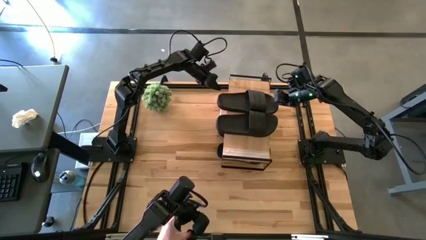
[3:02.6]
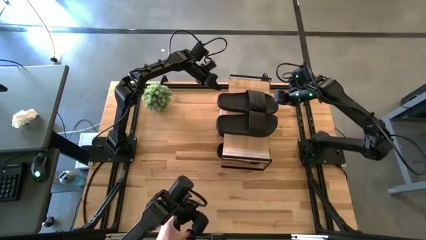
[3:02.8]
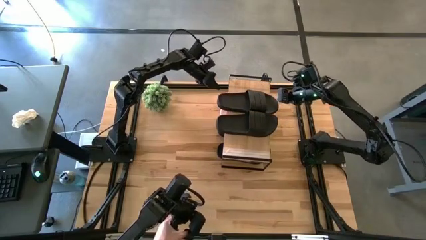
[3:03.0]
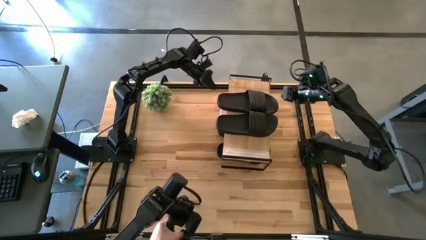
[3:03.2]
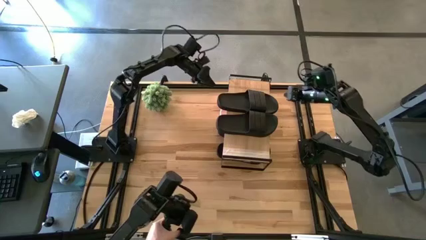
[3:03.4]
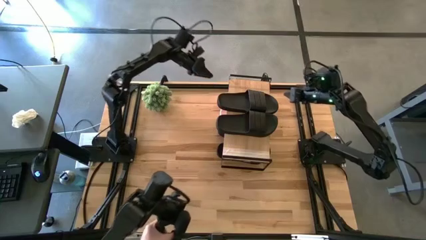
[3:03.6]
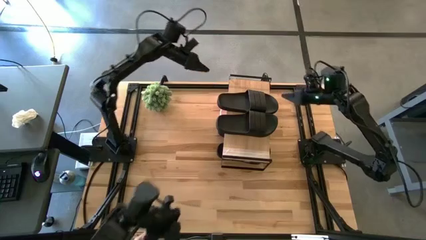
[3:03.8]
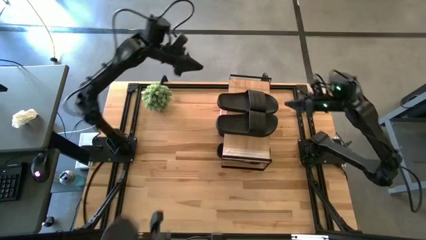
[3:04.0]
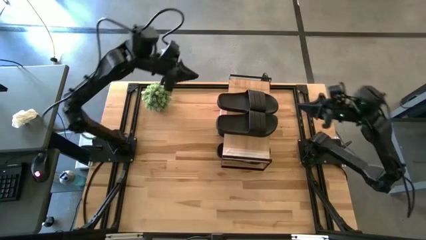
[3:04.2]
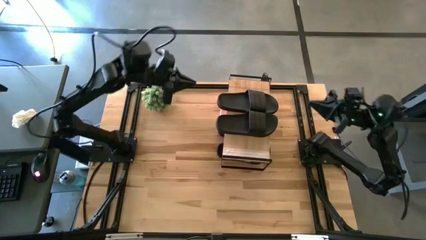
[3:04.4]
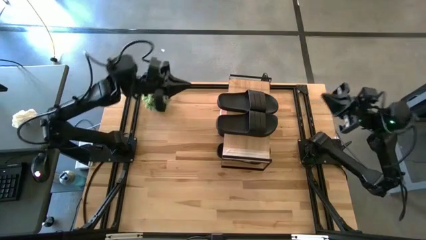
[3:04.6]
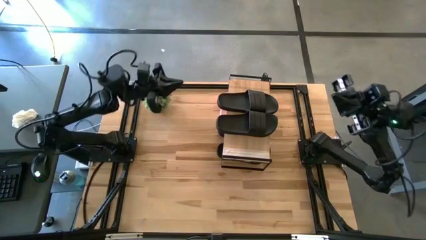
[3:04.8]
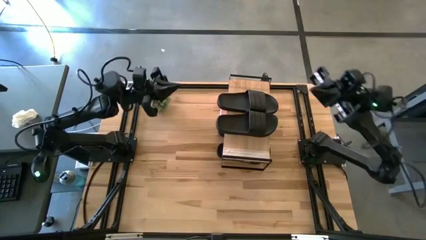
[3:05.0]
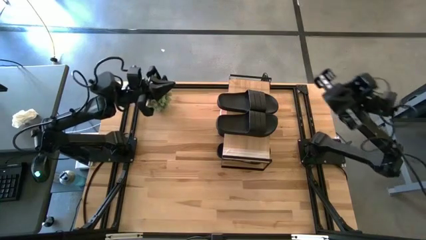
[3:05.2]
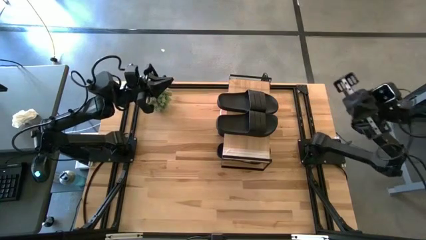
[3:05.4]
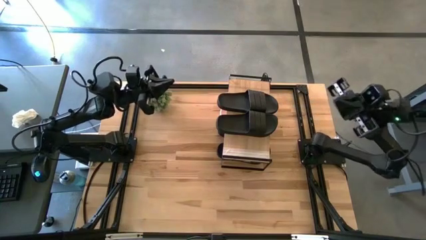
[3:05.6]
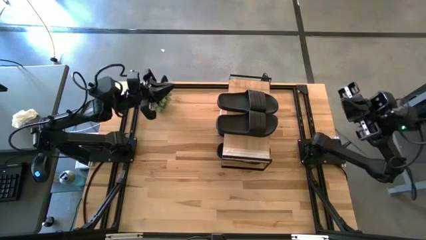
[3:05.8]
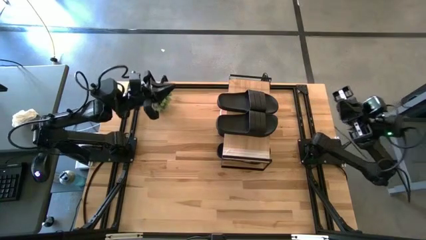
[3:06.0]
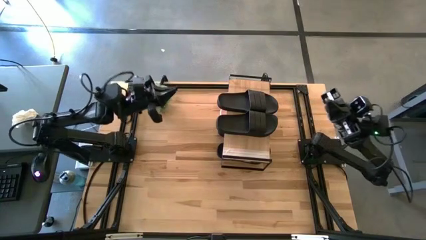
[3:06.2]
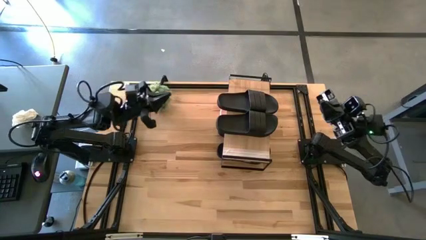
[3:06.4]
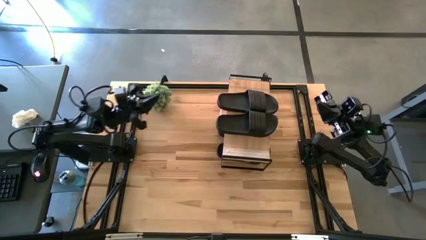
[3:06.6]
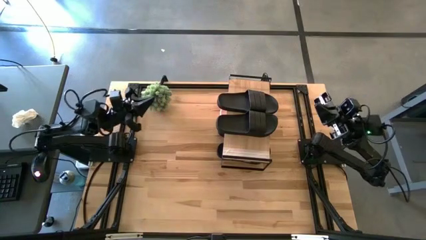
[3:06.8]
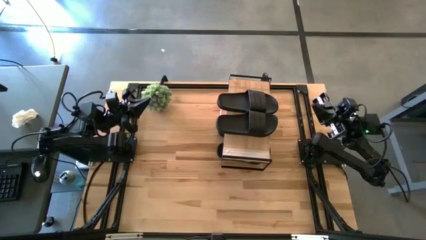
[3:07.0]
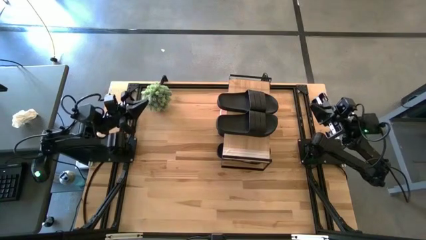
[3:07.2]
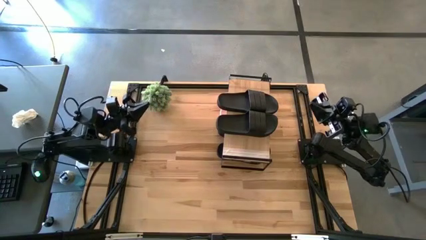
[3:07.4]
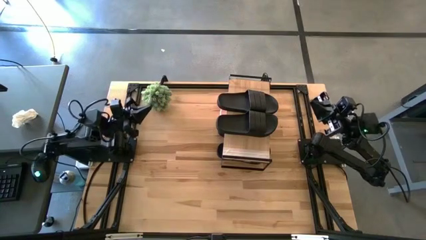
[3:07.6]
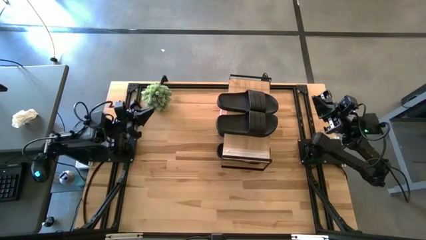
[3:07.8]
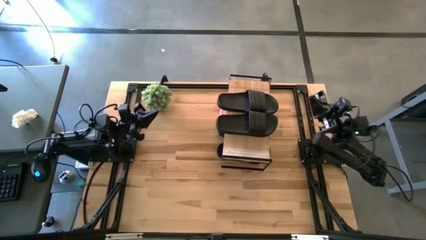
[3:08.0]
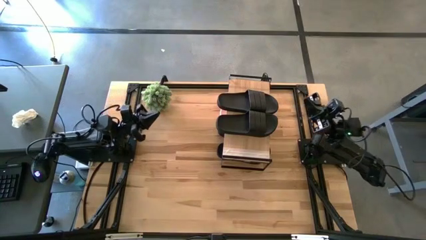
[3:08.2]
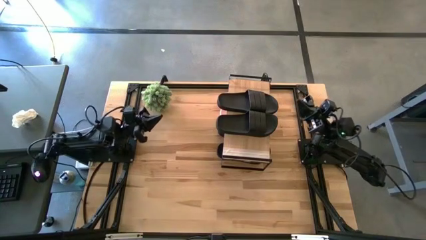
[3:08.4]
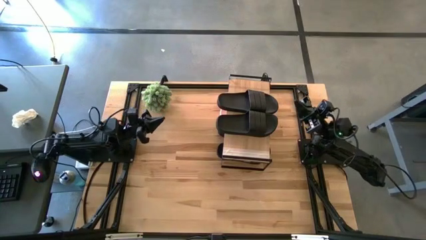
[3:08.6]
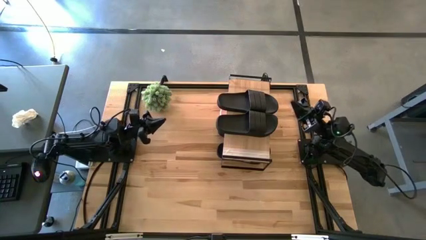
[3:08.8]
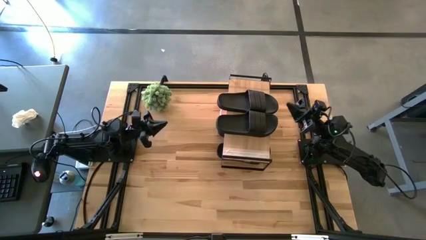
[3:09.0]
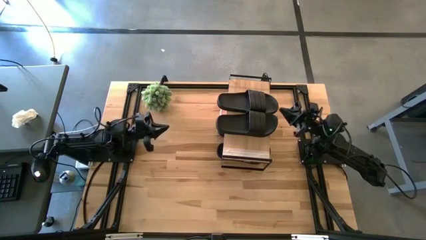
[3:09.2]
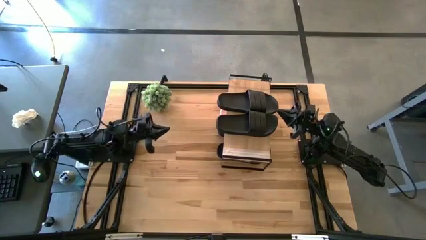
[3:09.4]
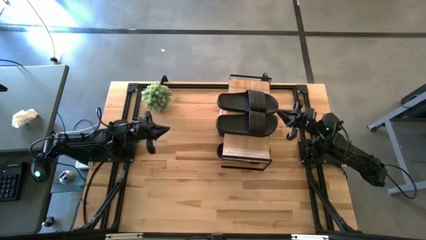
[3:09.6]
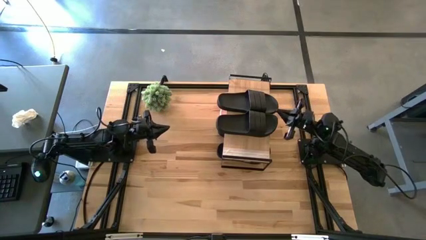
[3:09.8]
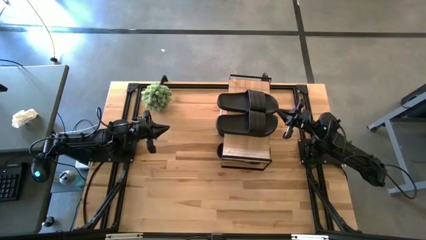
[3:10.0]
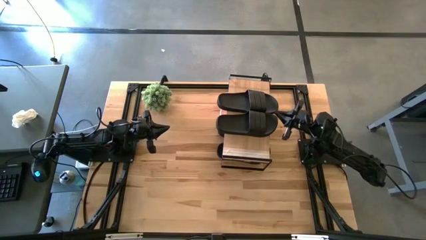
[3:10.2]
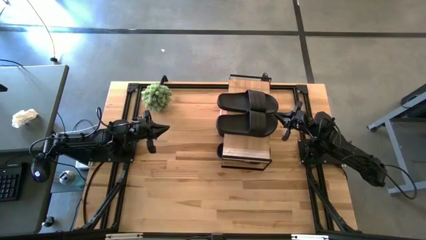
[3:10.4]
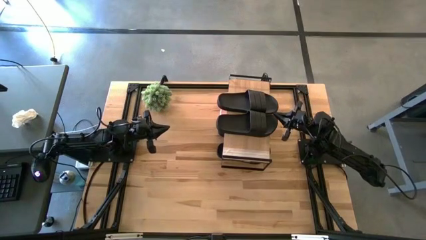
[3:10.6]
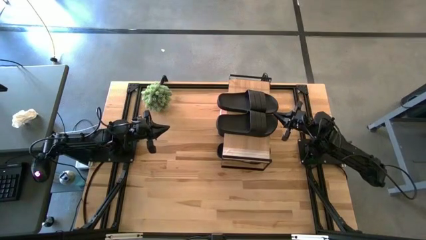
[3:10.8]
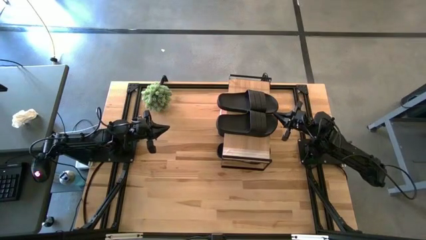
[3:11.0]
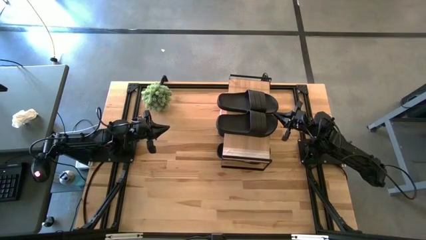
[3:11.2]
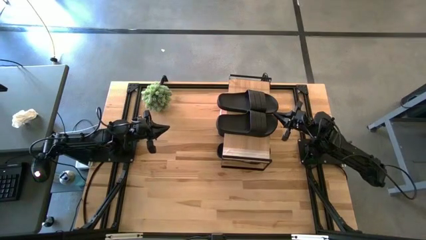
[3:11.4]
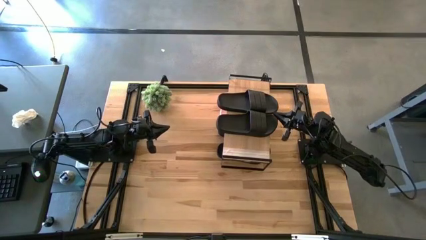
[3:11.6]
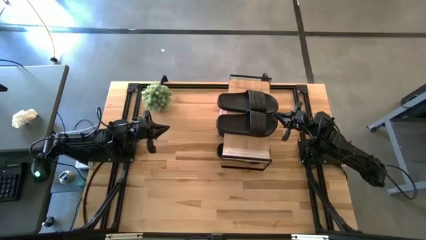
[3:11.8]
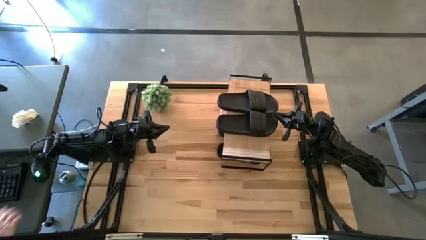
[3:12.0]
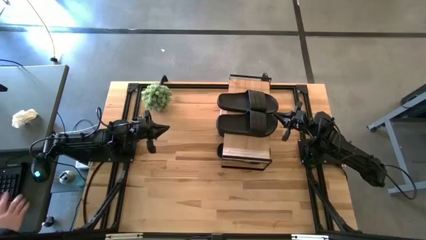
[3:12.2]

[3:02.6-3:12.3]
Task: Pick and place slides into the shelf
Return to Home Position

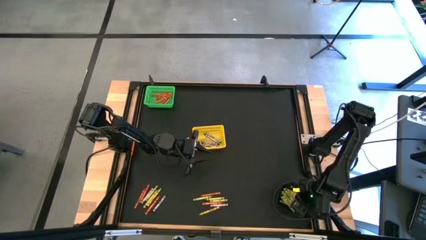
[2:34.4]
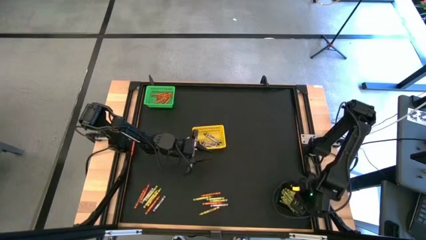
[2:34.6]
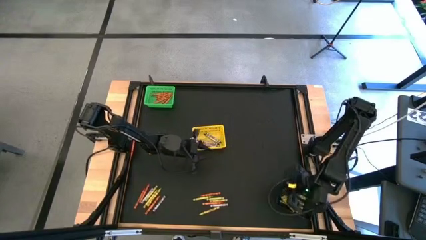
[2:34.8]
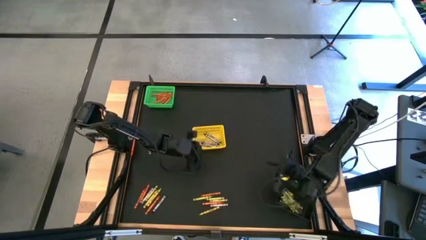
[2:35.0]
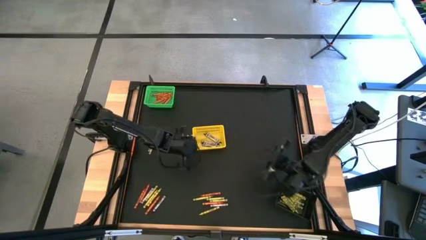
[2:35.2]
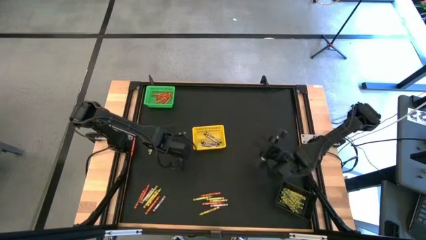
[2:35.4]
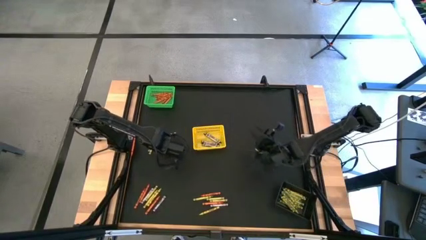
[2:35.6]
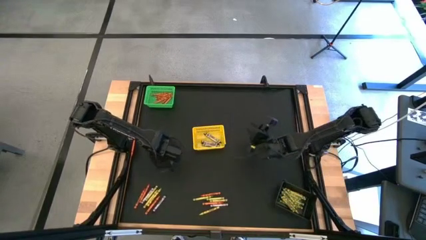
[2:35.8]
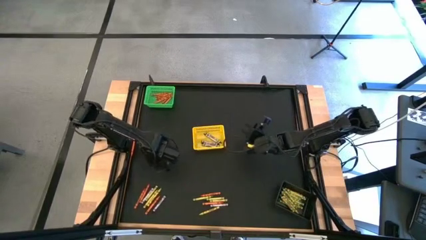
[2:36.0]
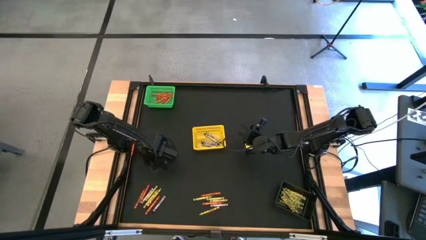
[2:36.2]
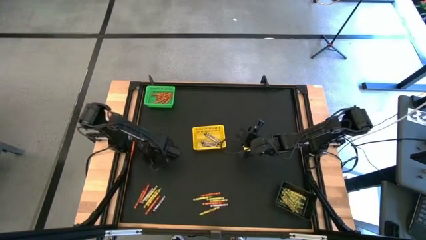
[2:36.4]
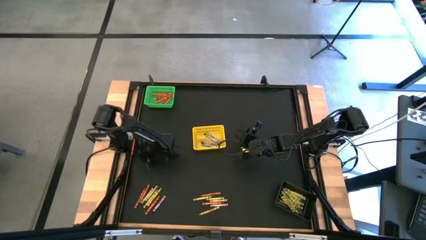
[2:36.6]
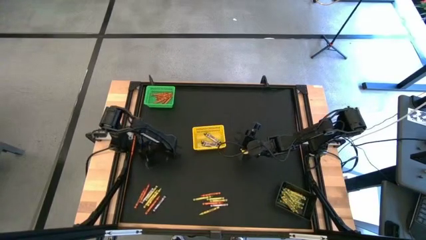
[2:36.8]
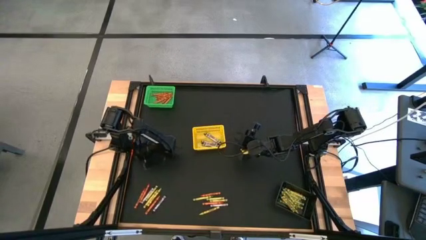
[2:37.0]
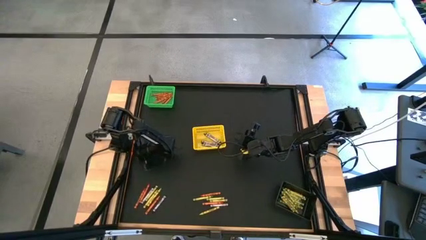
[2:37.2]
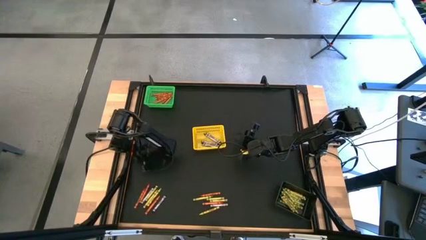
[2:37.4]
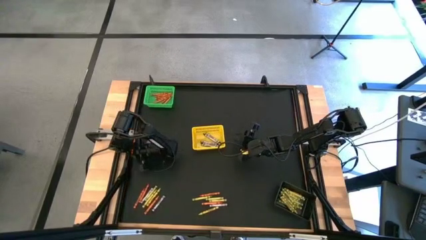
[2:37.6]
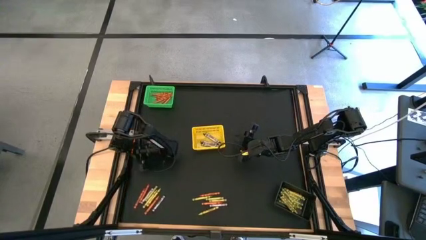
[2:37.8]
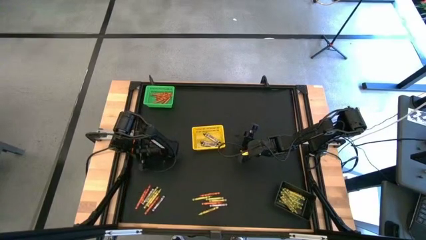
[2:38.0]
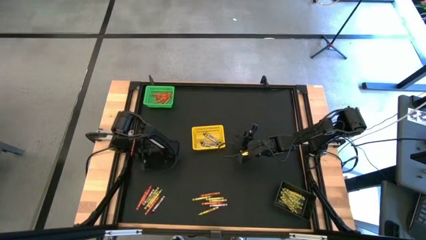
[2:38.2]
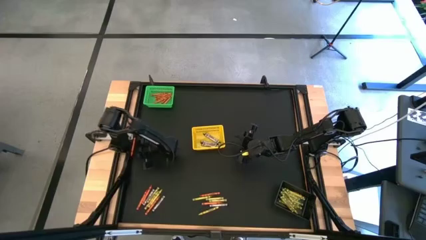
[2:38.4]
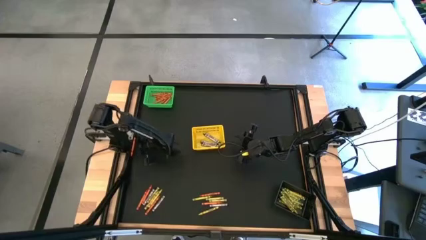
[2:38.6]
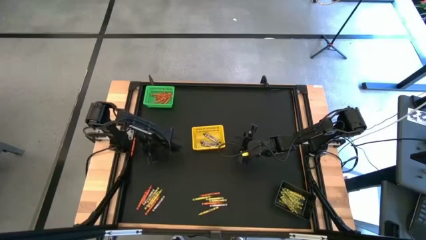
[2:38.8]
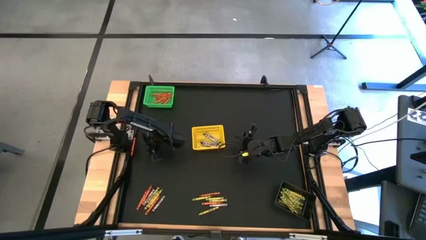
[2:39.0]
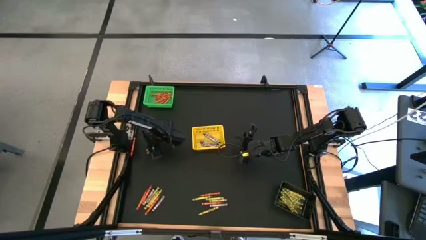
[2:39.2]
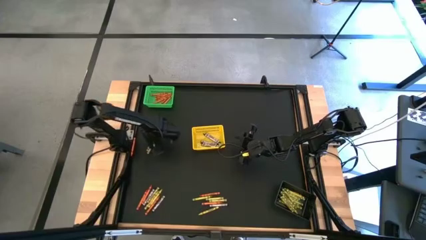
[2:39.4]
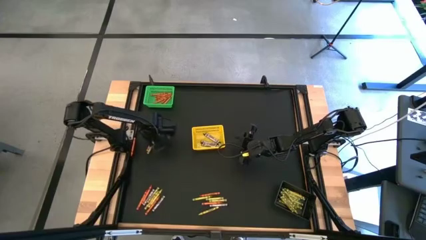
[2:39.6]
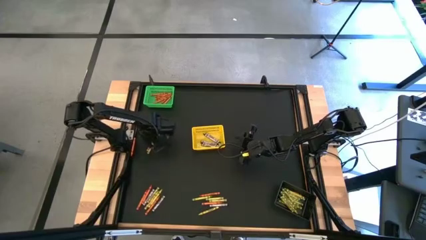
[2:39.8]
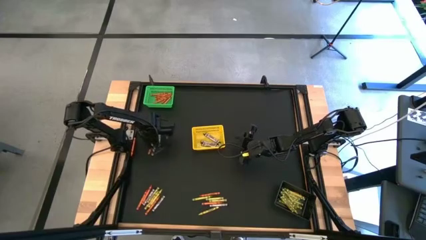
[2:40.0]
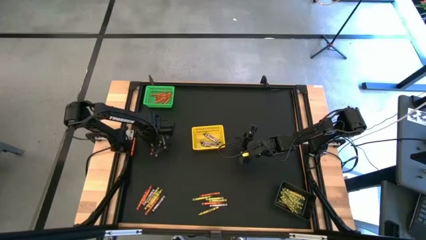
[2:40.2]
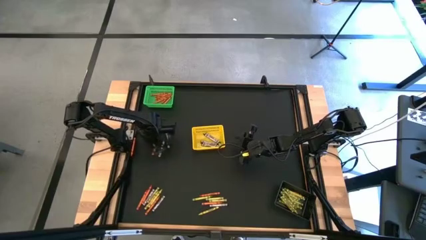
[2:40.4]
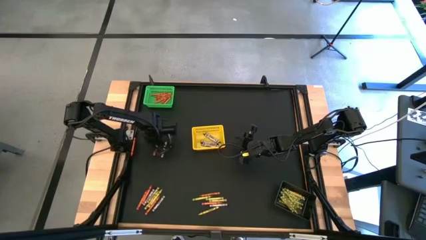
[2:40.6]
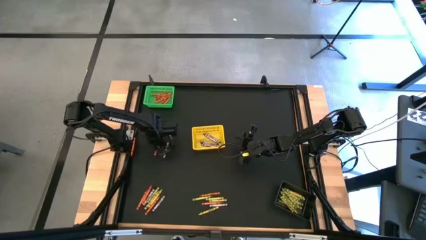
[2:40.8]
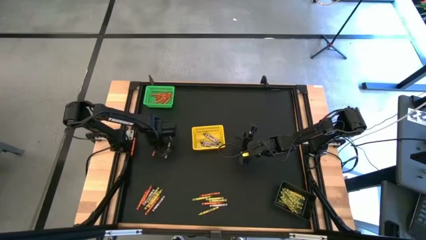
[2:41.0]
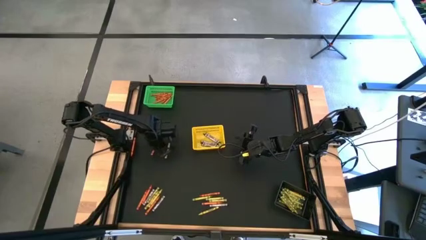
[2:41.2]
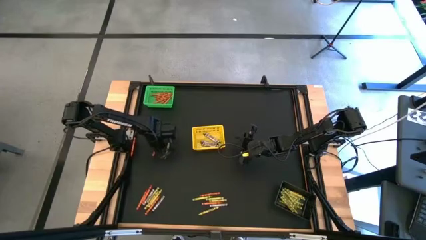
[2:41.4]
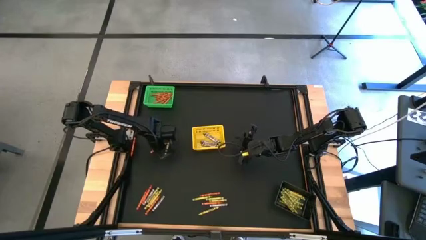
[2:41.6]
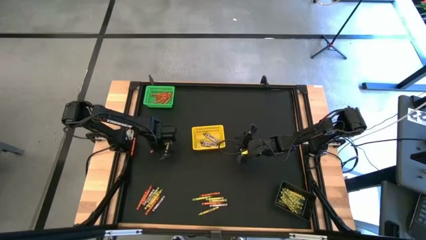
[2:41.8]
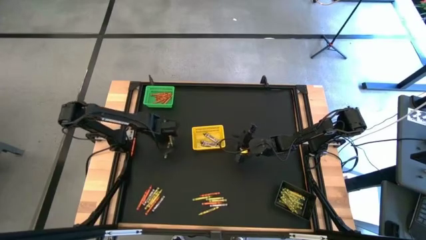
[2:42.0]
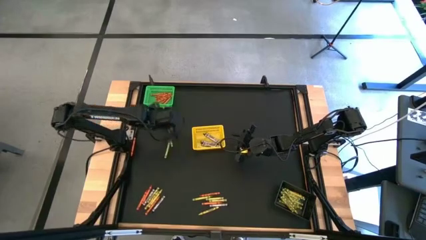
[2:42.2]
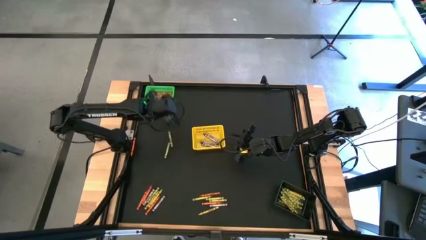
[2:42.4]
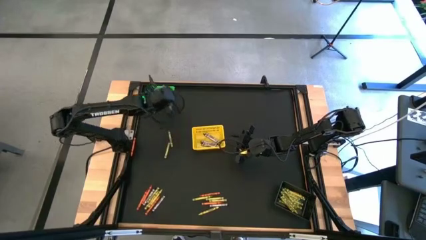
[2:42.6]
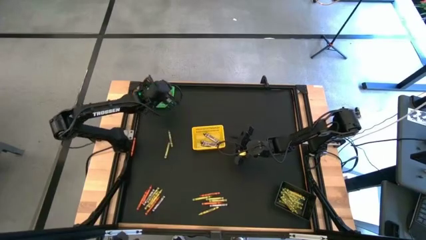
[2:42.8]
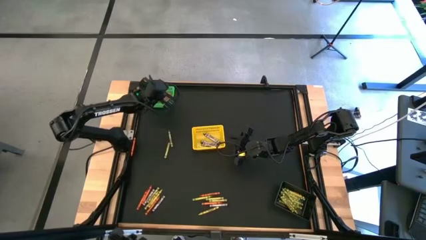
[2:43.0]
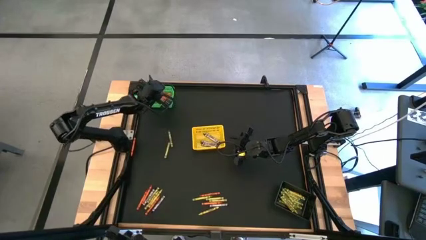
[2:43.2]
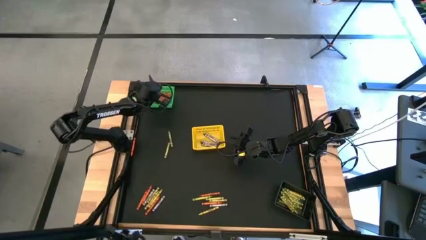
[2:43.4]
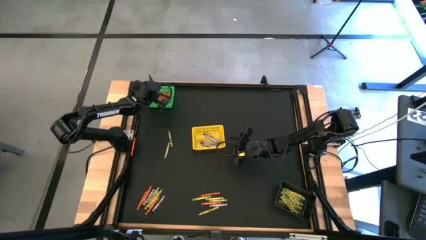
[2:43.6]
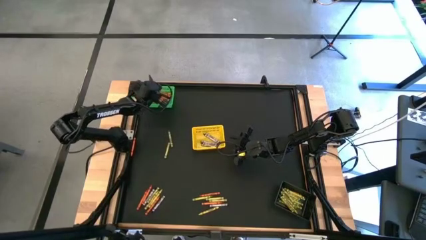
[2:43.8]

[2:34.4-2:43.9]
Task: Sort crayons
Put the orange crayon into the green bin
